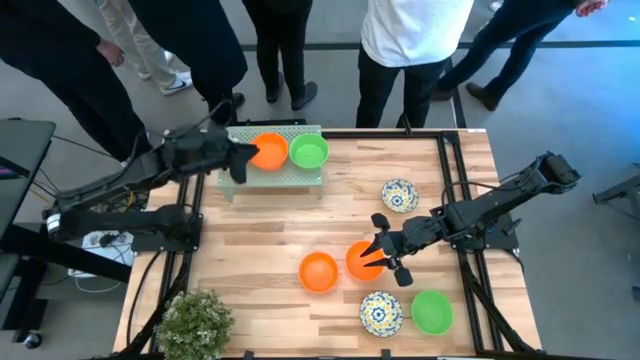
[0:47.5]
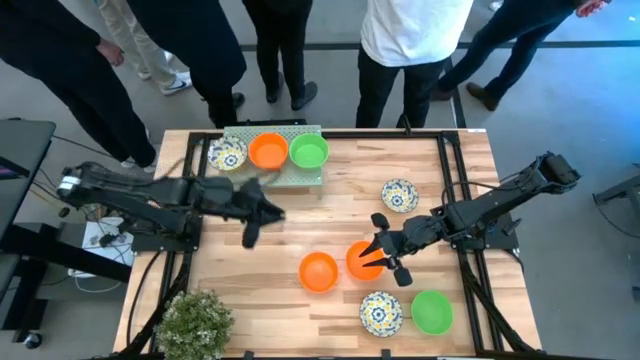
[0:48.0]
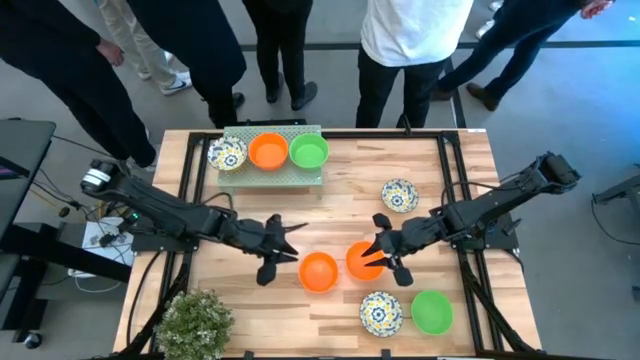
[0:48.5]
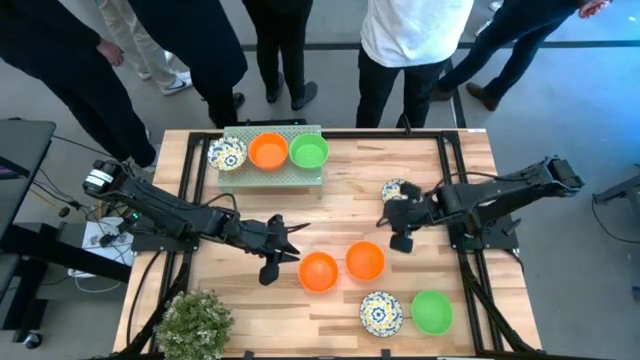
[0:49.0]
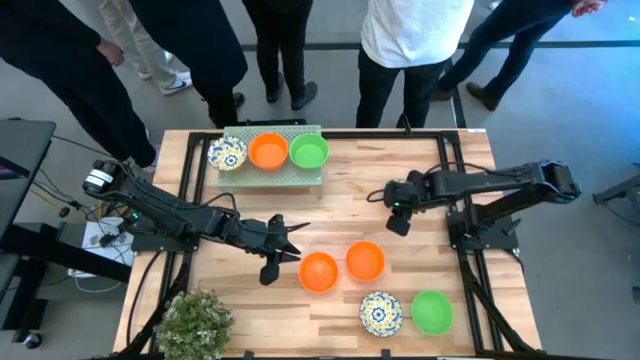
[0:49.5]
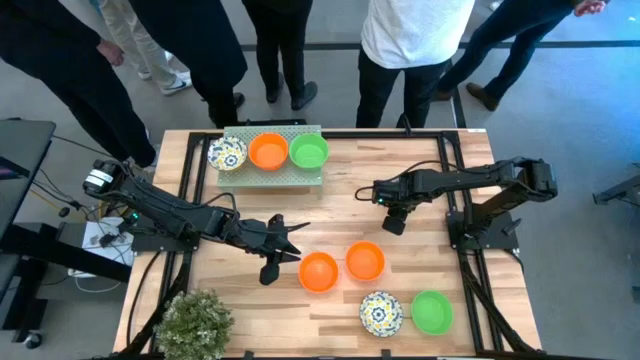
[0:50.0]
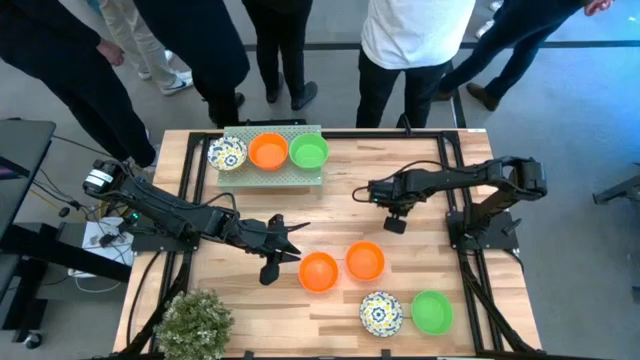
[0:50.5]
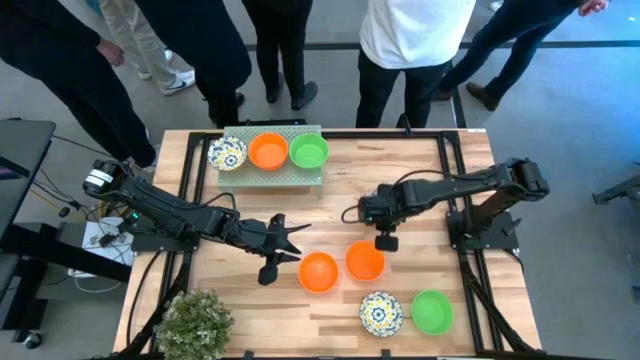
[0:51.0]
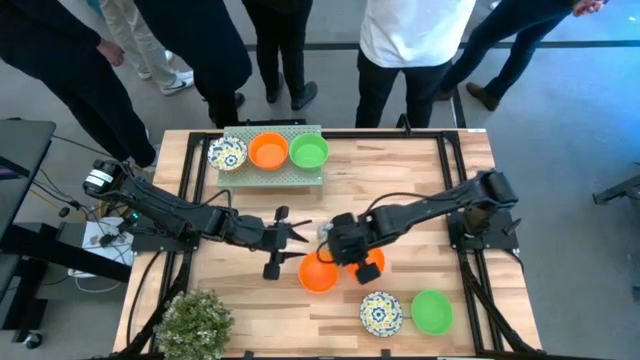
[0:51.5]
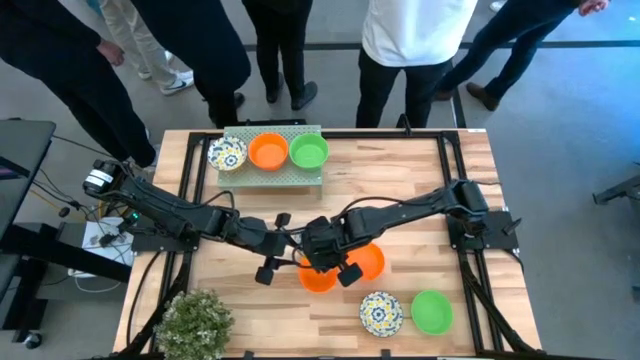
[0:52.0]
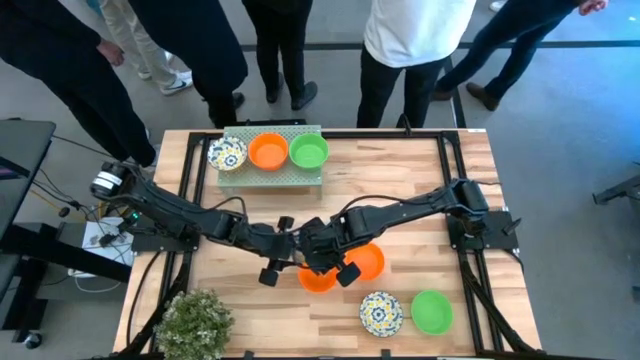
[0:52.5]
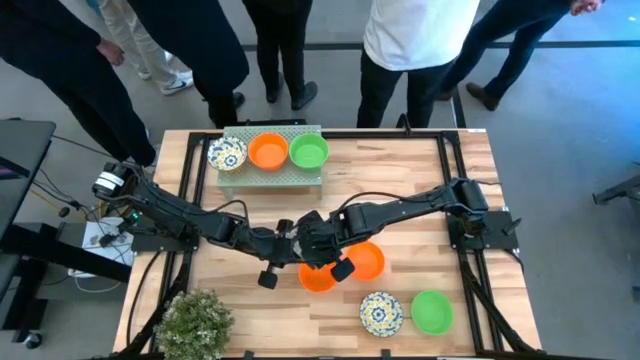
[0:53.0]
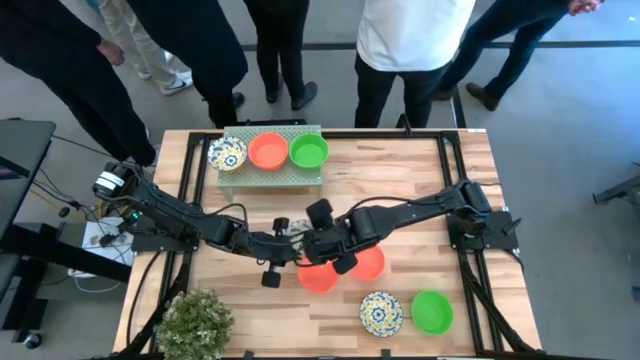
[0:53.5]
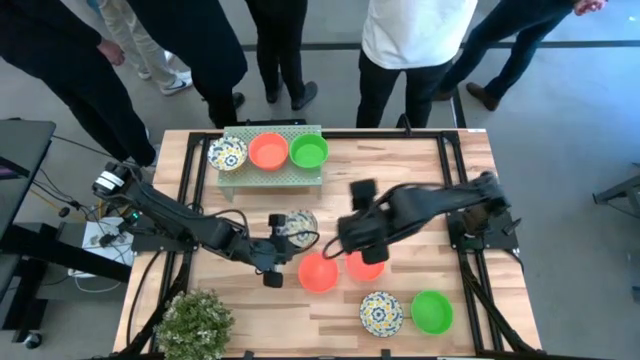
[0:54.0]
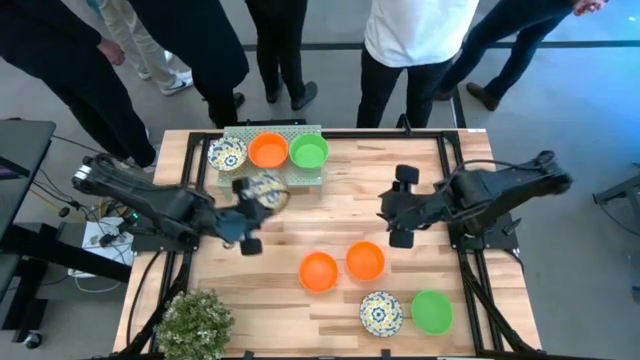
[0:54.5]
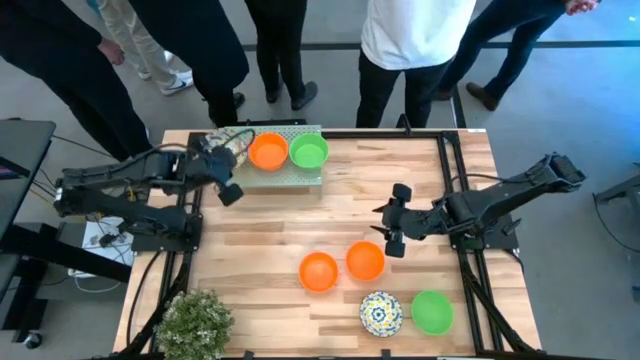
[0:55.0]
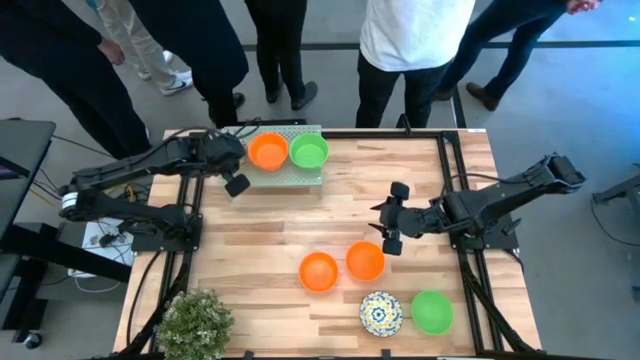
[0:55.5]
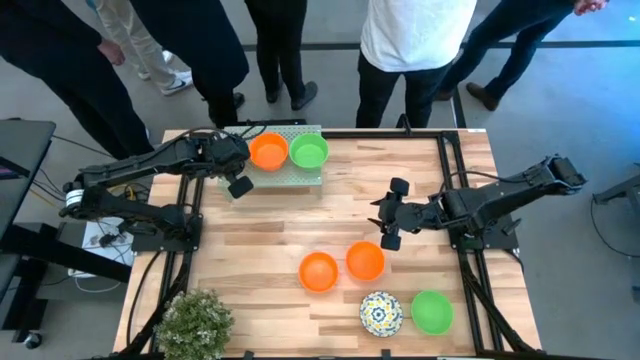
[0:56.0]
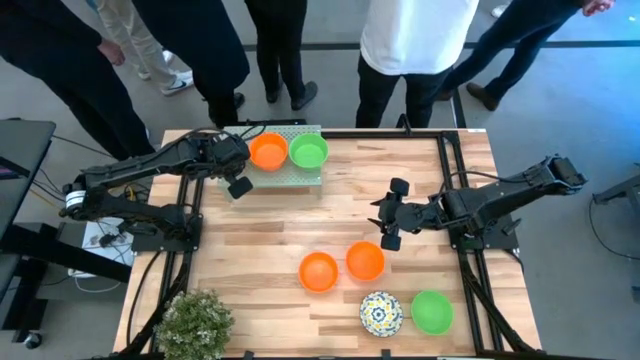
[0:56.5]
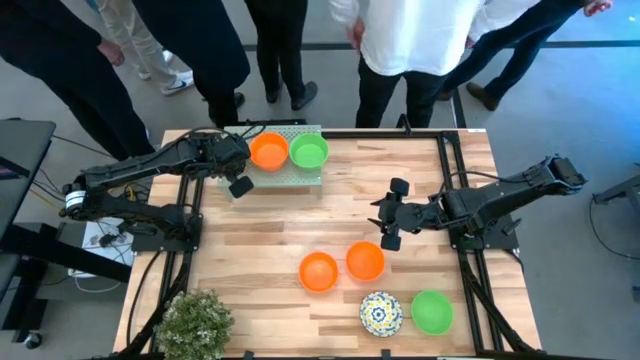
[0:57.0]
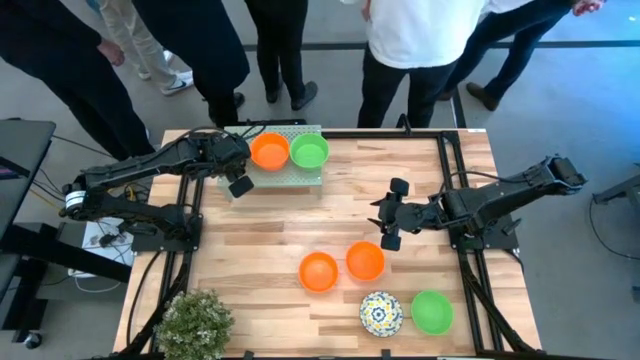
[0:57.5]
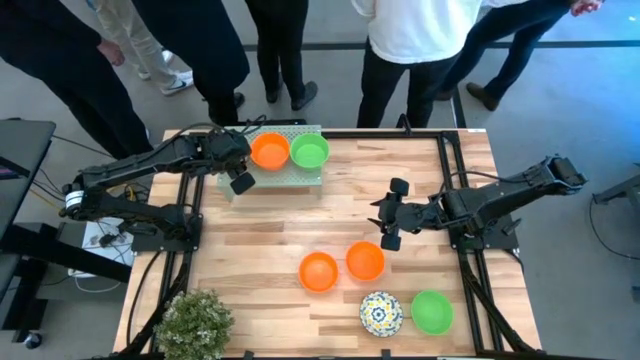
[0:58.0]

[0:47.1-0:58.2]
Task: Pick & Place Mini bowls
Stack the white patterned bowl on top of the other white patterned bowl on the shelf

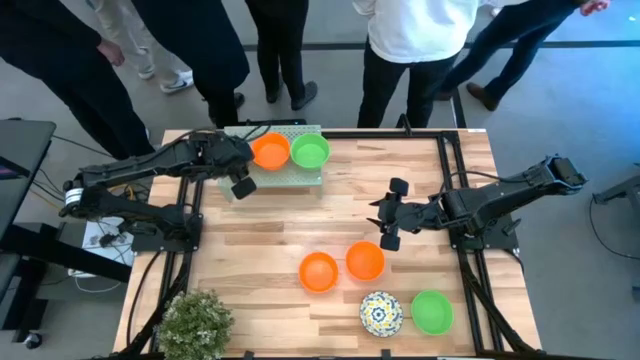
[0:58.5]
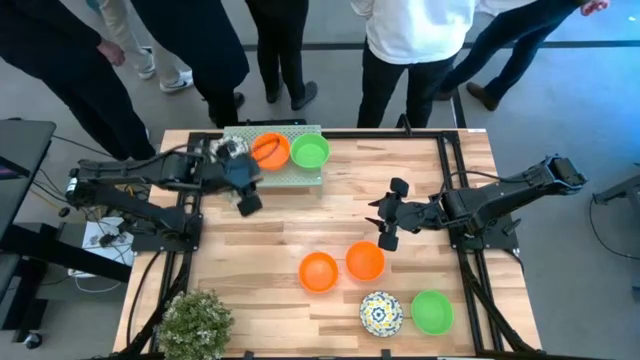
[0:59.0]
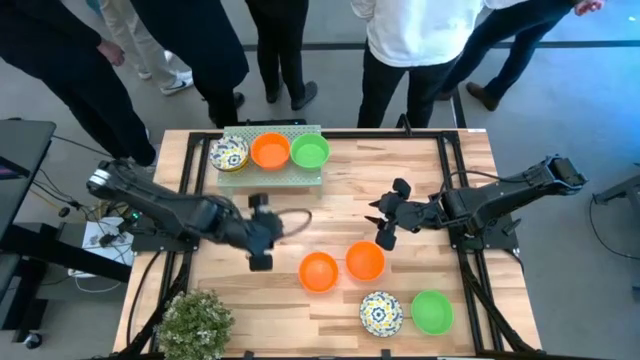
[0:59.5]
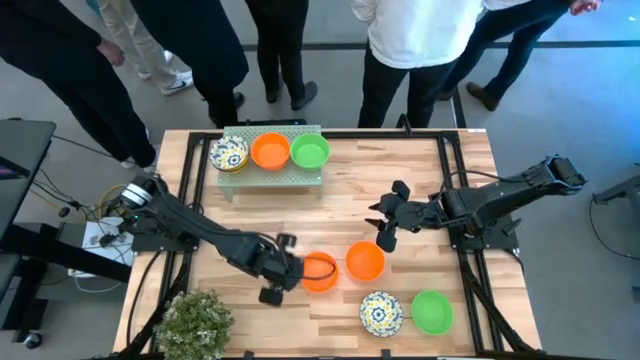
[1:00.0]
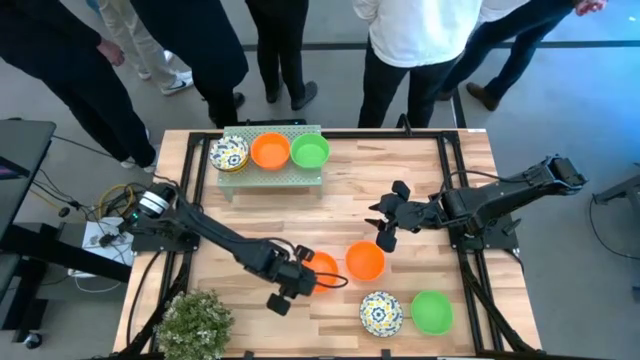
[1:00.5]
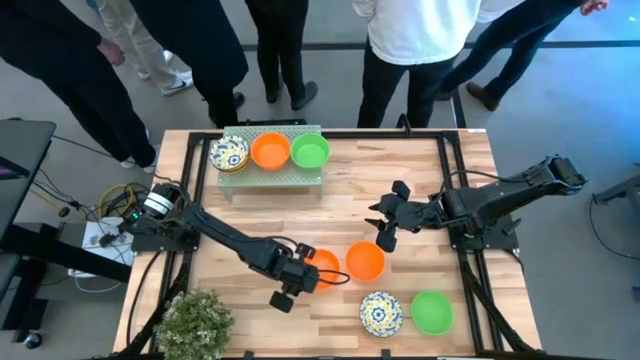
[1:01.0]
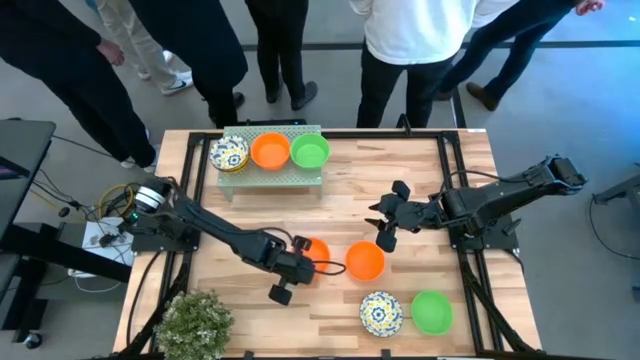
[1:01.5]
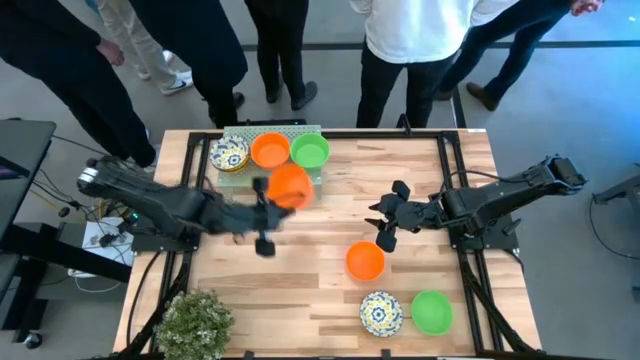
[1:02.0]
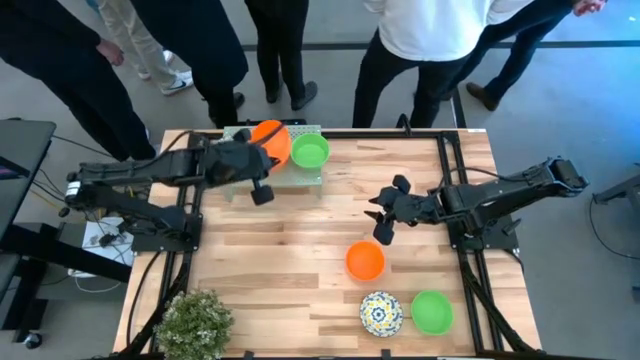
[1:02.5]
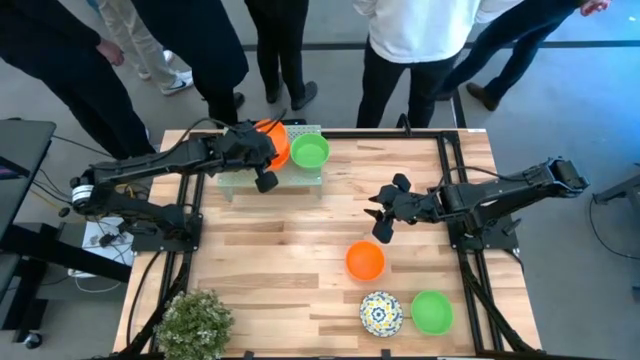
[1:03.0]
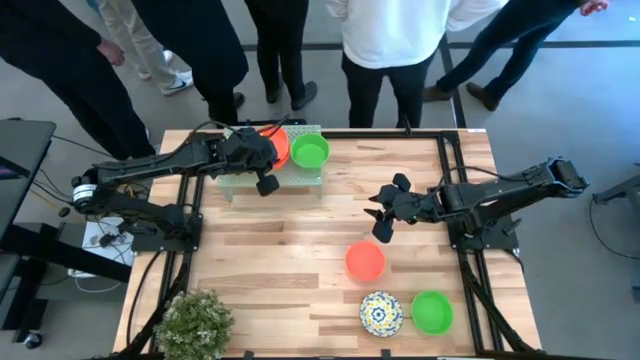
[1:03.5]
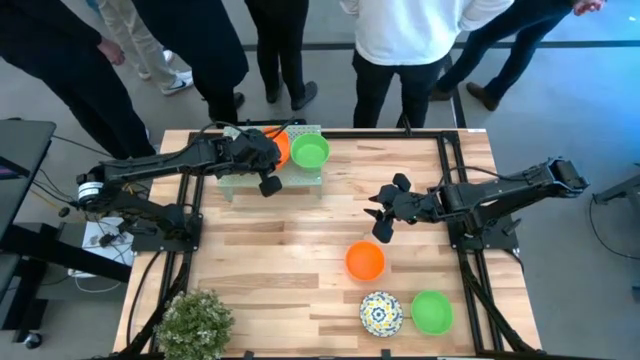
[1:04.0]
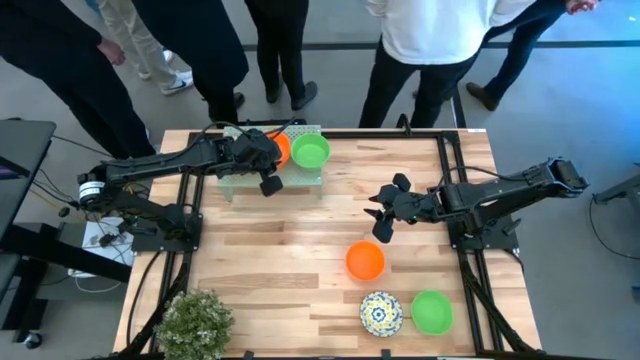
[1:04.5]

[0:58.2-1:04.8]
Stack the orange bowl on top of the other orange bowl on the shelf

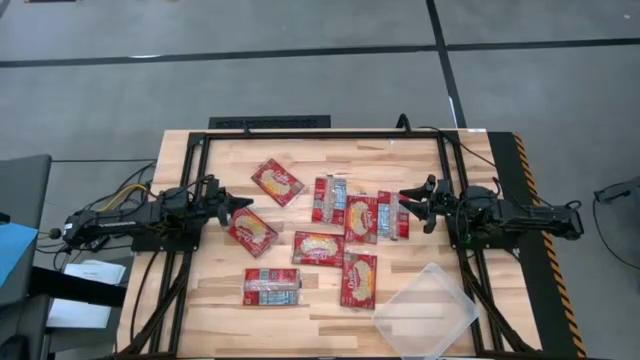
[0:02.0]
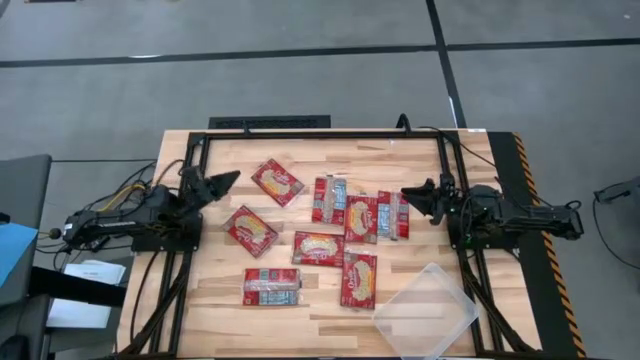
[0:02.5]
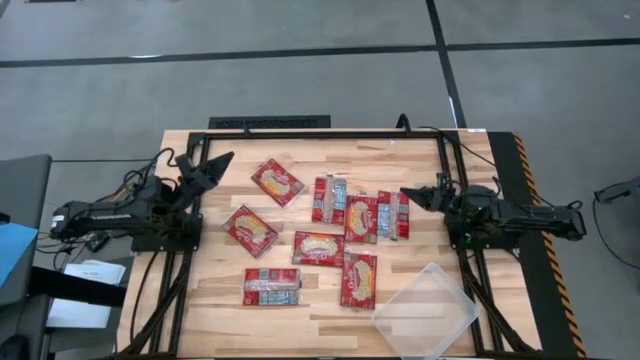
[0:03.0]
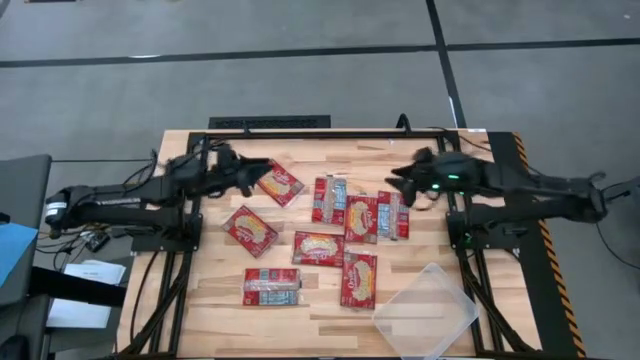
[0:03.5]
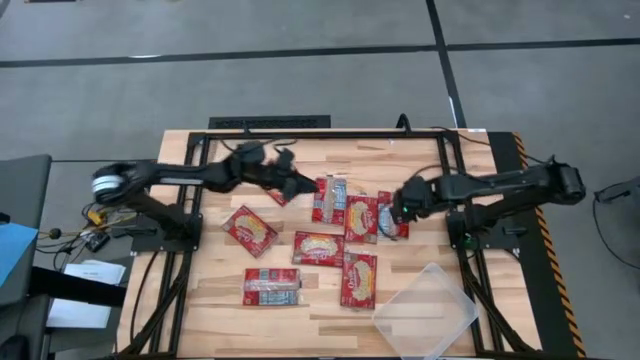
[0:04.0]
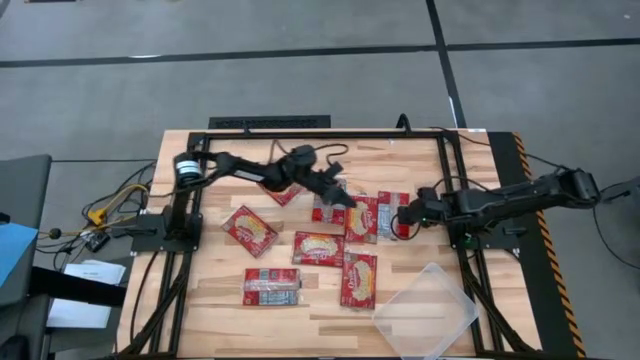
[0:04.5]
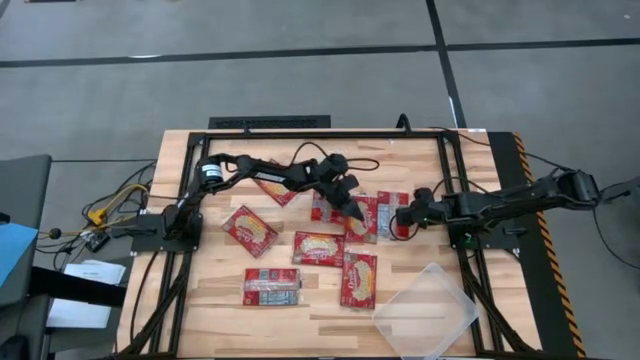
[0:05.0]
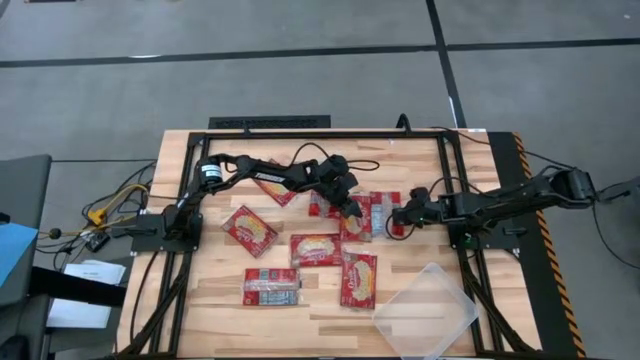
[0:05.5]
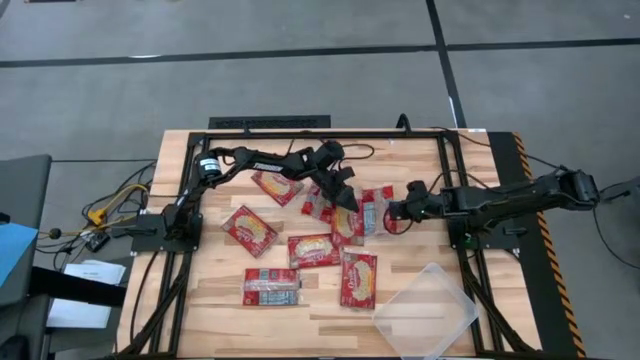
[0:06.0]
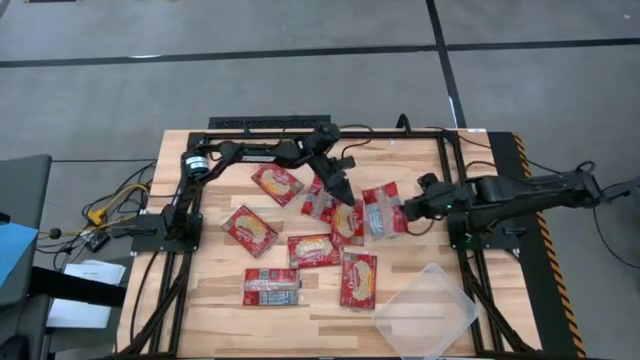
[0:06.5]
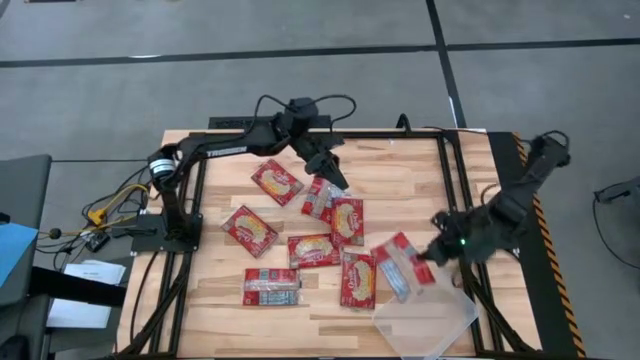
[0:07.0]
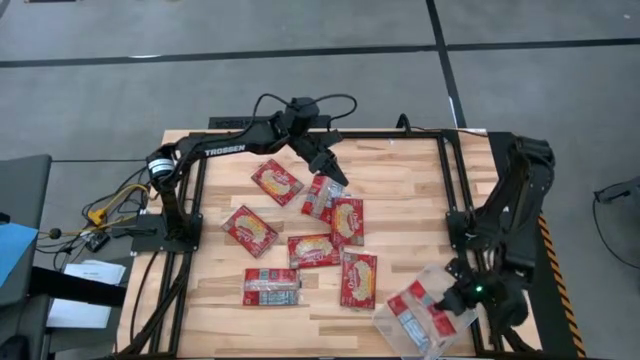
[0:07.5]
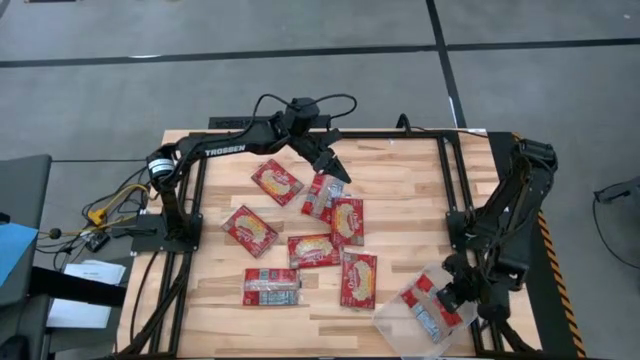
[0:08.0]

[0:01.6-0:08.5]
Task: Sort popcorn bags into baskets
Put the red popcorn bag into the transparent bin
